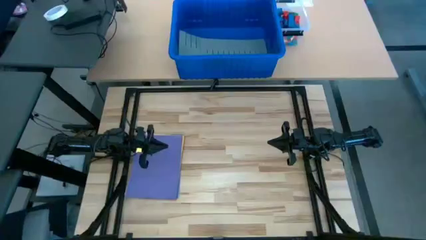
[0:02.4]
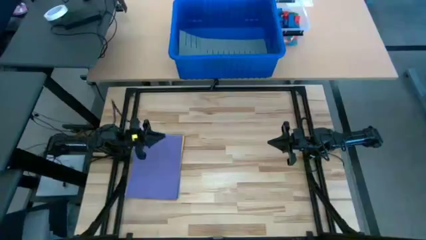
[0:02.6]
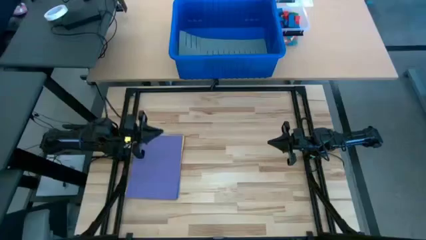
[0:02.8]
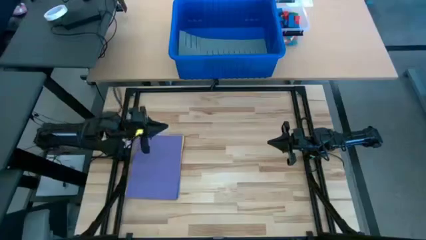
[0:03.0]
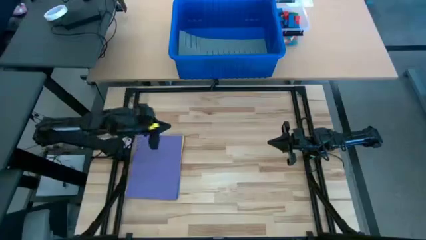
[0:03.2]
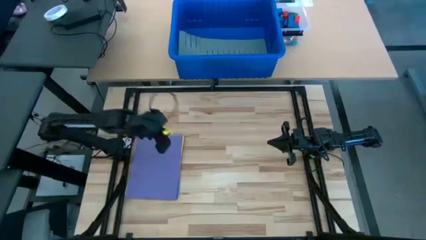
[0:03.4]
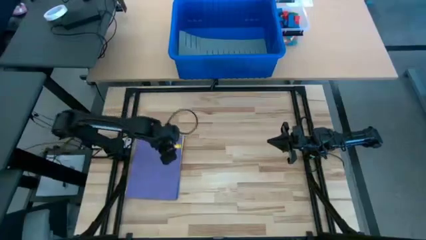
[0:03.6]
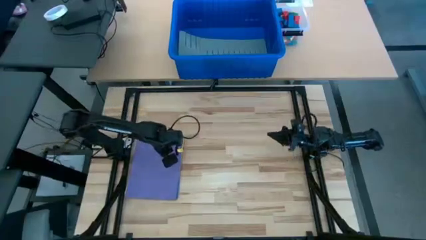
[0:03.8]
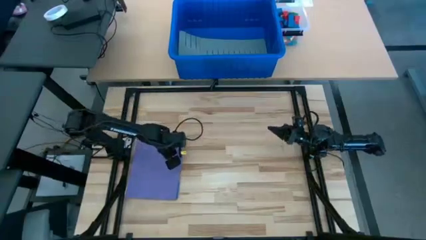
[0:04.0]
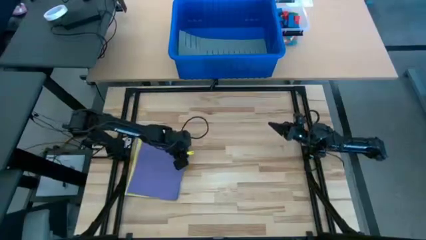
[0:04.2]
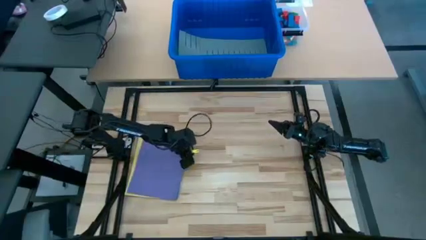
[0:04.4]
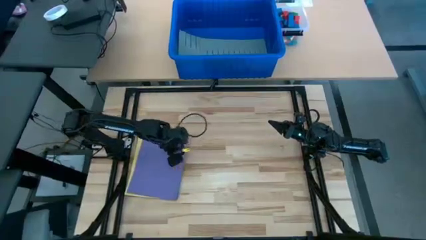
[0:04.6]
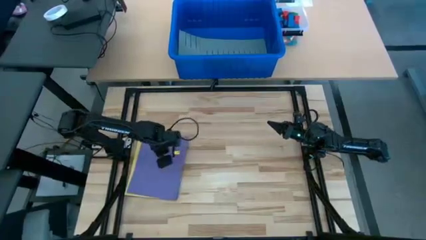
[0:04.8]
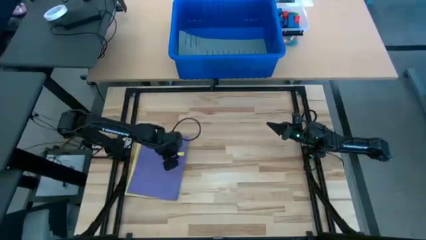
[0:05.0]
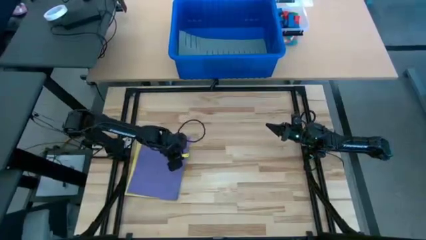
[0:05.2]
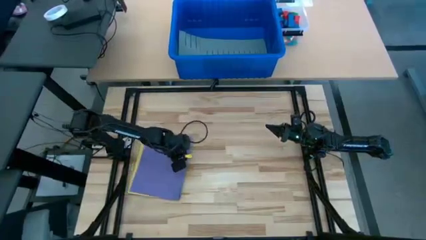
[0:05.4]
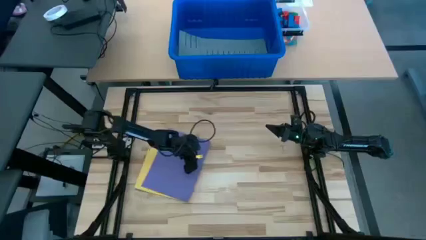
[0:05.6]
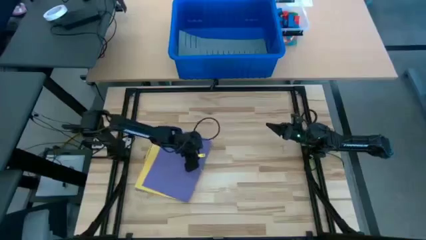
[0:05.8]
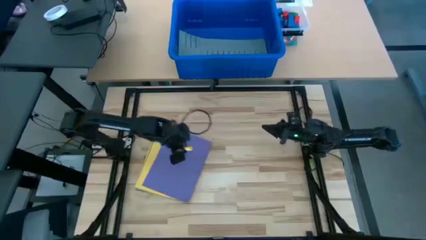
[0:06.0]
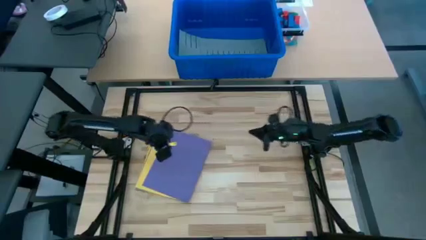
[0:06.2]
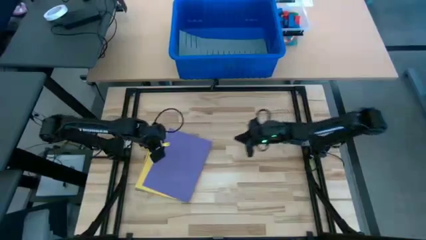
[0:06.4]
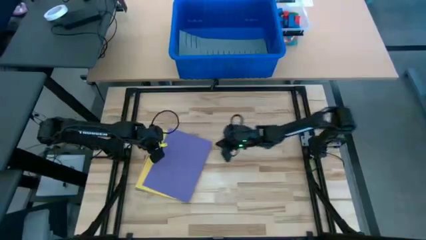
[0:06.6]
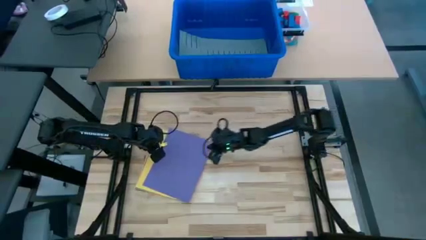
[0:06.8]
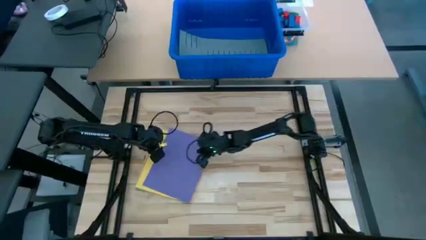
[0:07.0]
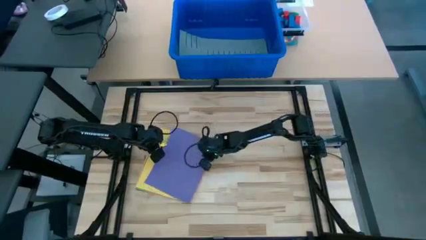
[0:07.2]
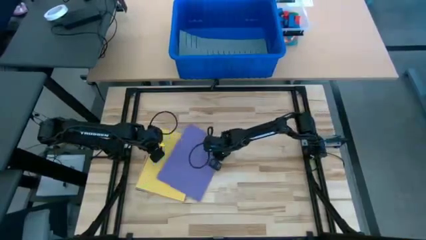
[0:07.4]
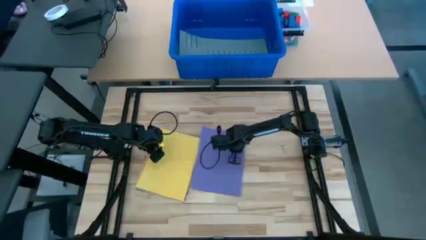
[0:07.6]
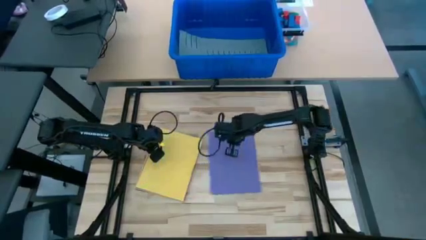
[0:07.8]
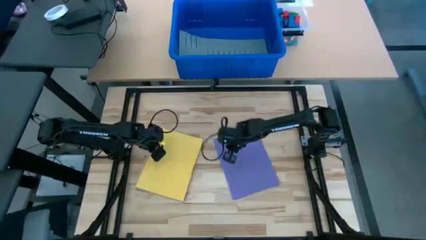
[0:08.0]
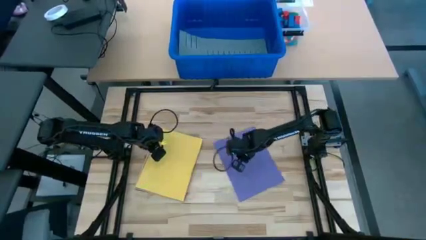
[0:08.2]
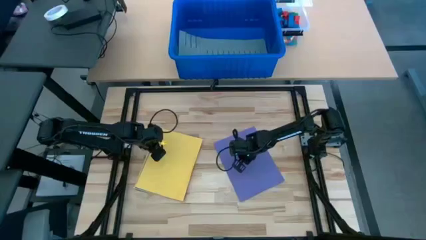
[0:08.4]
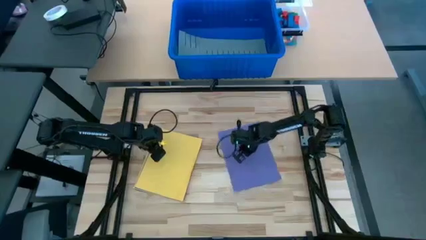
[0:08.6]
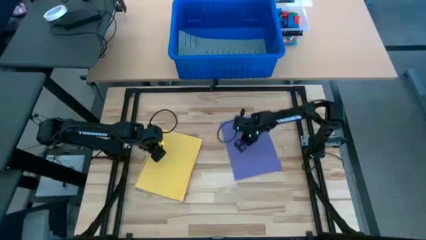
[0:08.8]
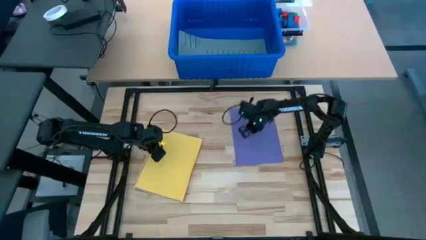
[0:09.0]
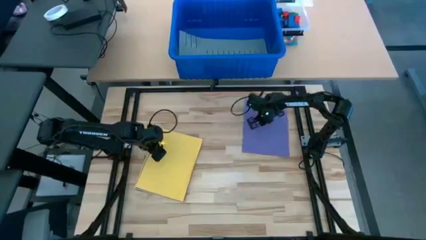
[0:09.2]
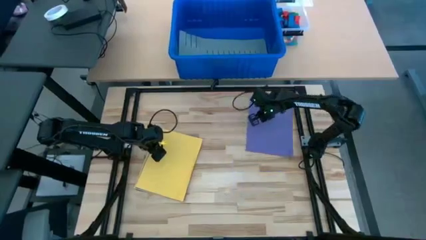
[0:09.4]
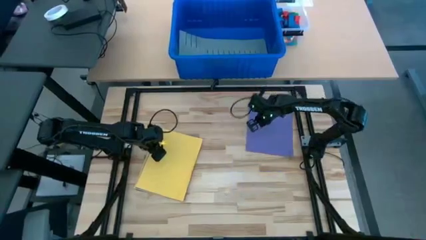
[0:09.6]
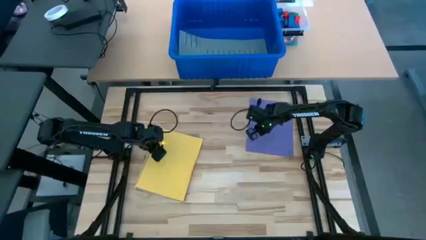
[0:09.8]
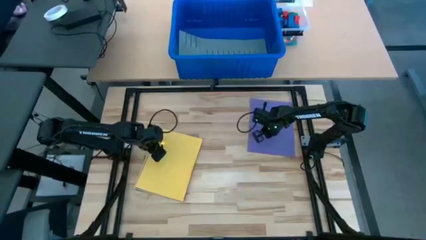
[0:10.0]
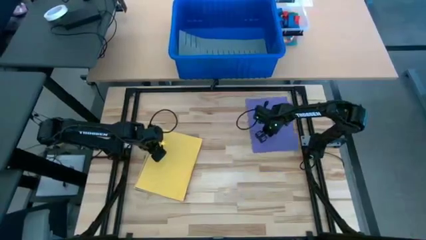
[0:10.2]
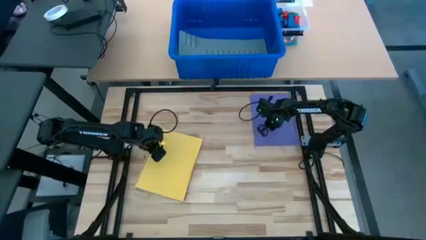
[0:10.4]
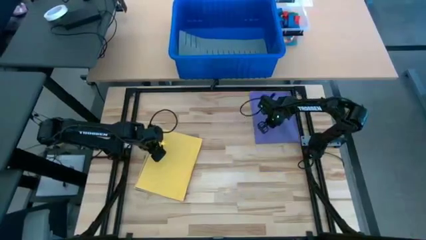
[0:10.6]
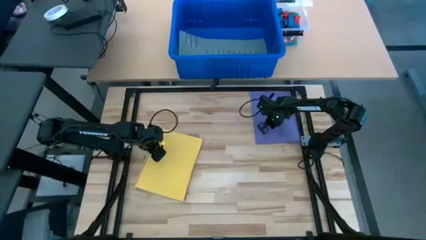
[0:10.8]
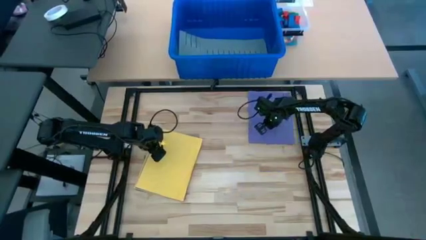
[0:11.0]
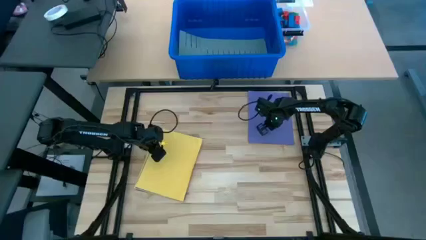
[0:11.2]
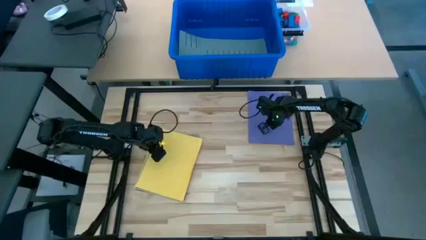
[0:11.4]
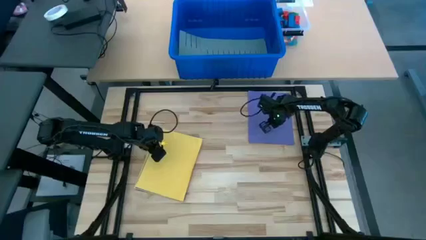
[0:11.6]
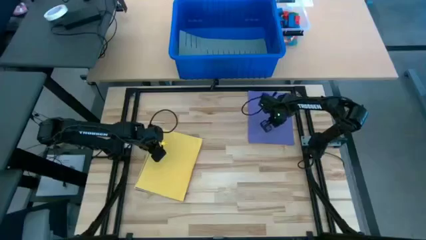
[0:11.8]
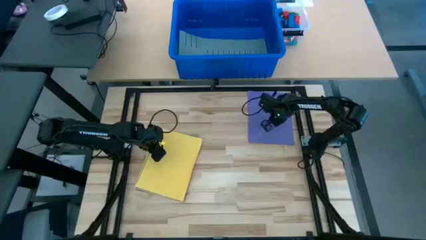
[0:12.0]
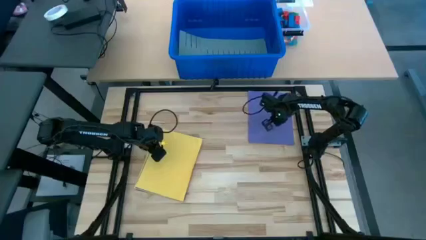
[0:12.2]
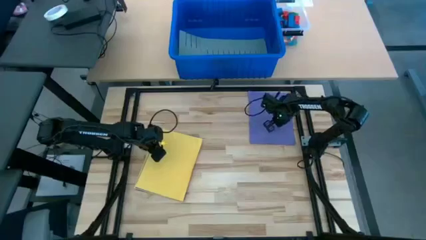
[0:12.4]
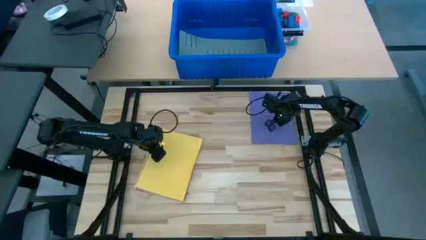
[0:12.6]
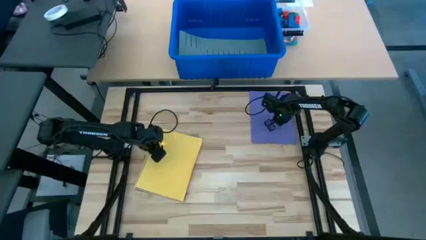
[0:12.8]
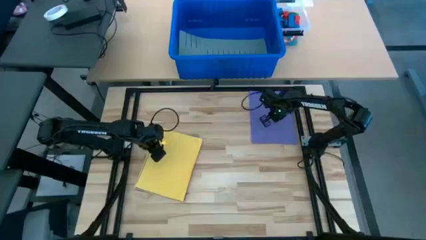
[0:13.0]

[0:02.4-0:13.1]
Task: Organize paper
Adjust the purple paper

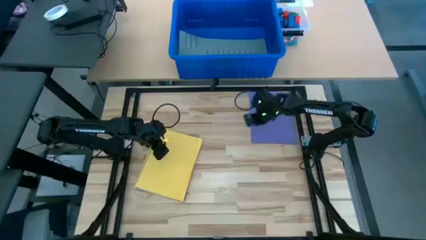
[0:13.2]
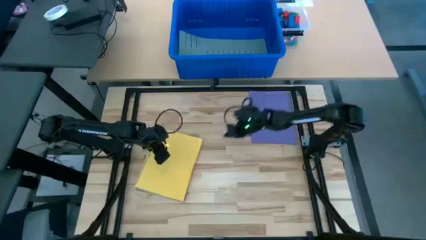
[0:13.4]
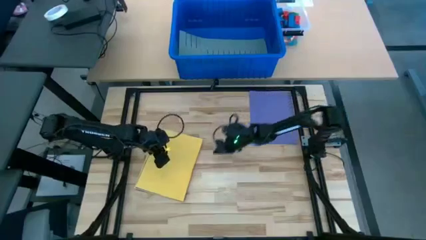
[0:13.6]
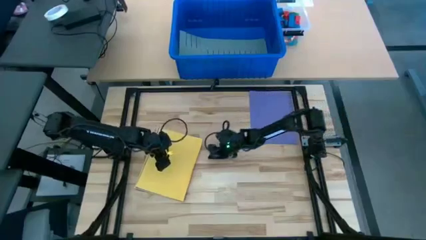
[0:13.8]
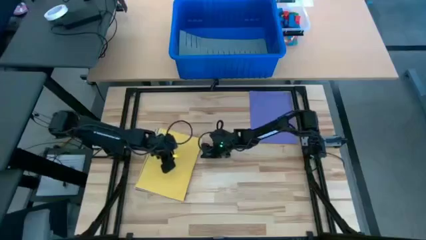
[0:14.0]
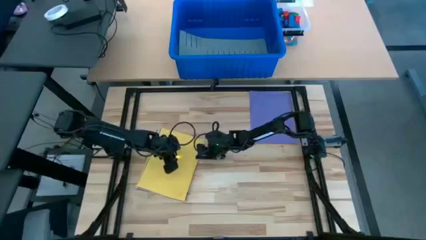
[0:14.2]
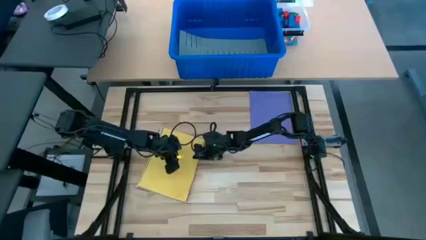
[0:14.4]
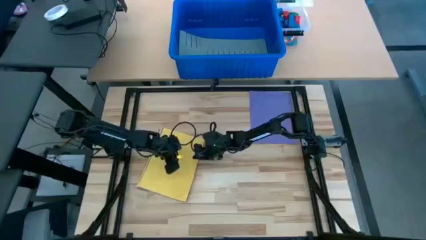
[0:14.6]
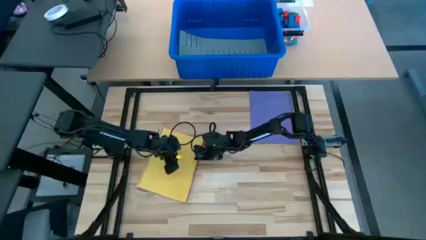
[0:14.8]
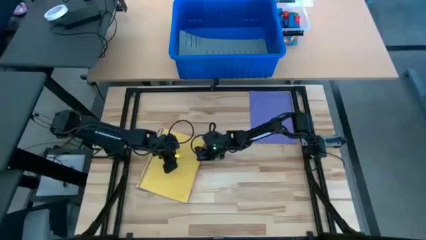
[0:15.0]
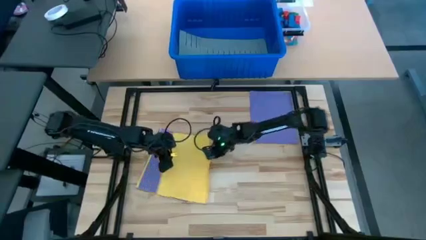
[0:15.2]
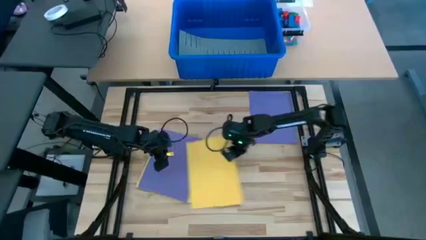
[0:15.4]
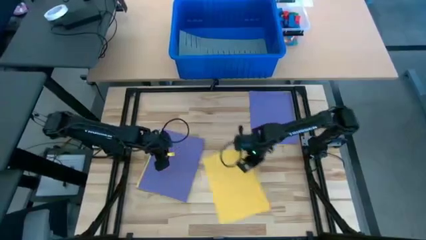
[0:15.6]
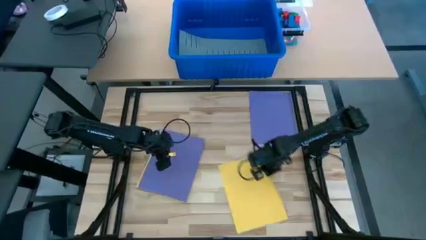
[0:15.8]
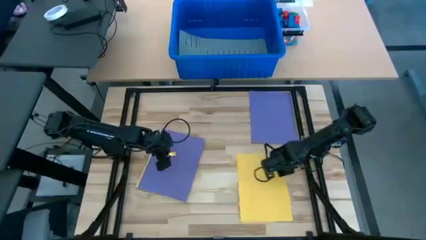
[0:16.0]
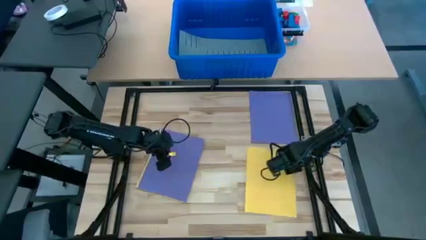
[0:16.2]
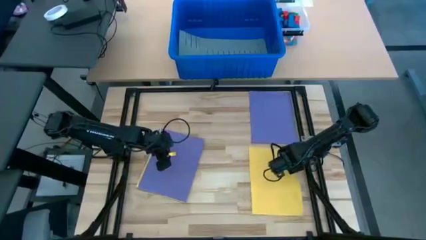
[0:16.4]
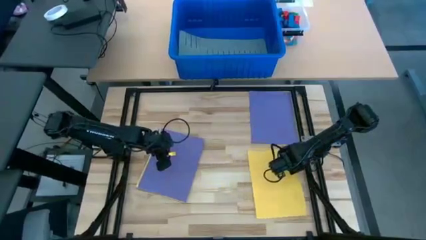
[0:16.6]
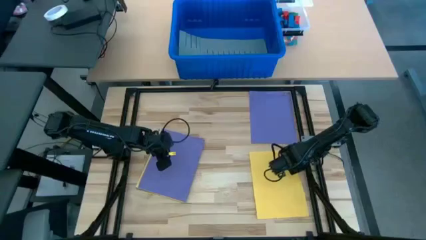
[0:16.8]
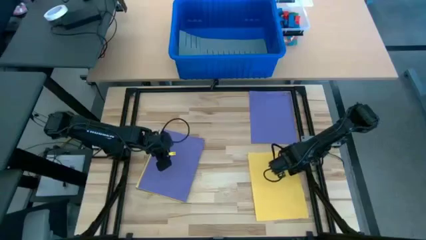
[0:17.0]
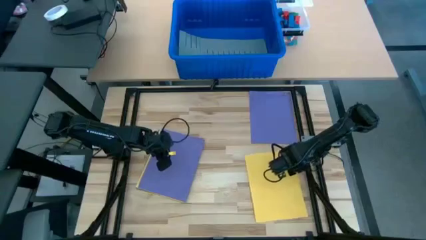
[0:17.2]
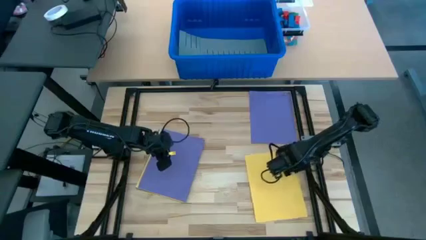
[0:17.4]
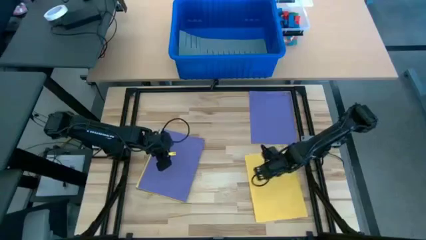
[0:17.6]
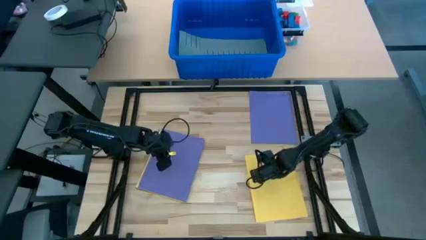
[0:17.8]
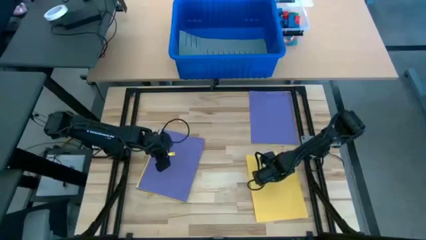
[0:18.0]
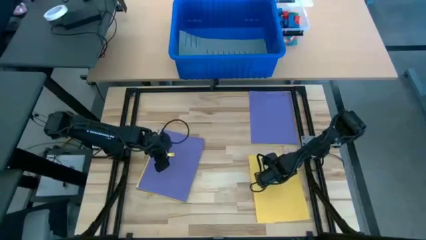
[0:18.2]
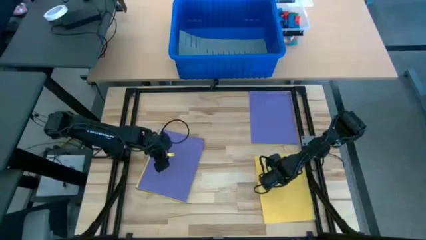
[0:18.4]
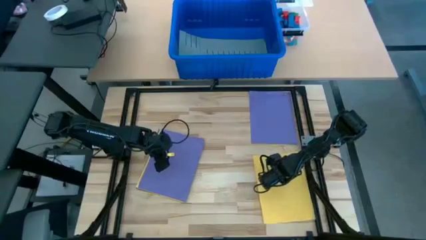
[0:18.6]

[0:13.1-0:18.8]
Put the yellow paper on the table

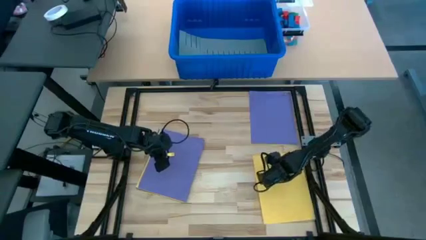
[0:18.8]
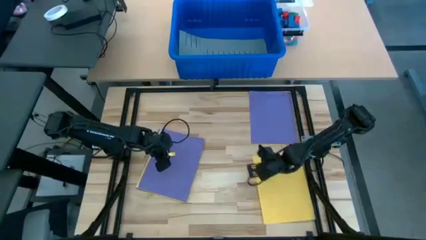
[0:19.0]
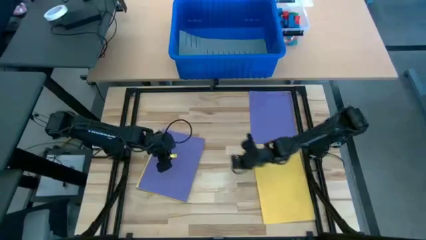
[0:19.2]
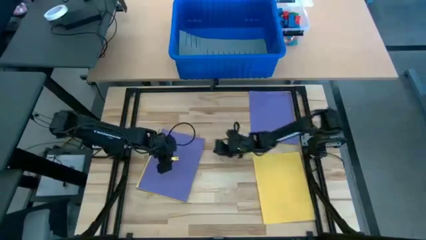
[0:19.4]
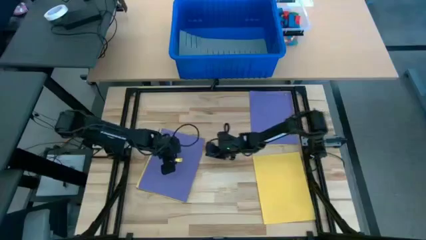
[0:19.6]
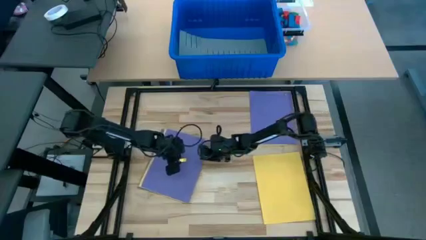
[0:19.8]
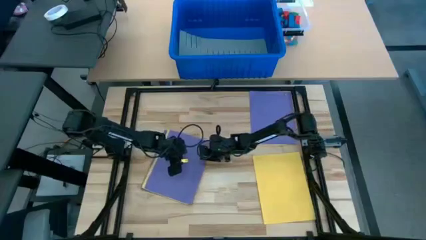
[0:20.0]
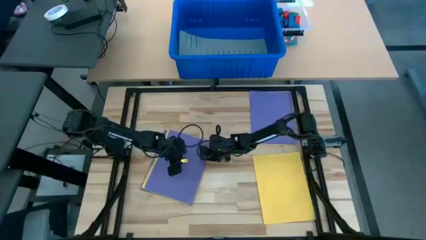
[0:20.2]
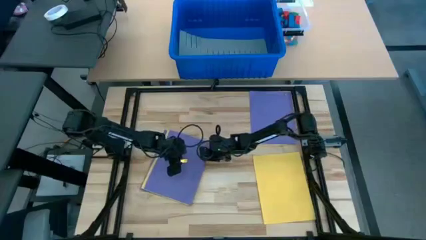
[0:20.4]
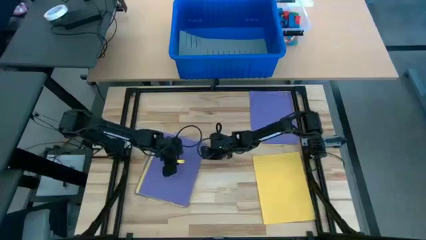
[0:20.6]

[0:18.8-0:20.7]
Stack the purple paper on top of the other purple paper
